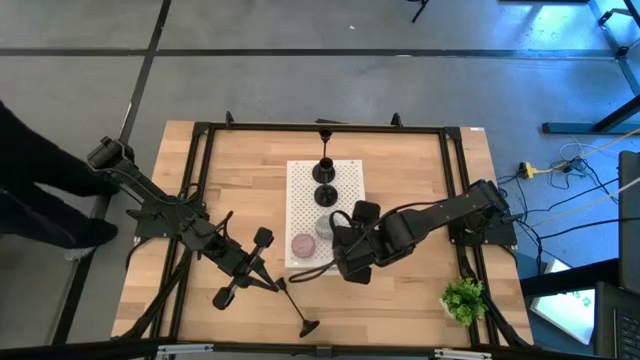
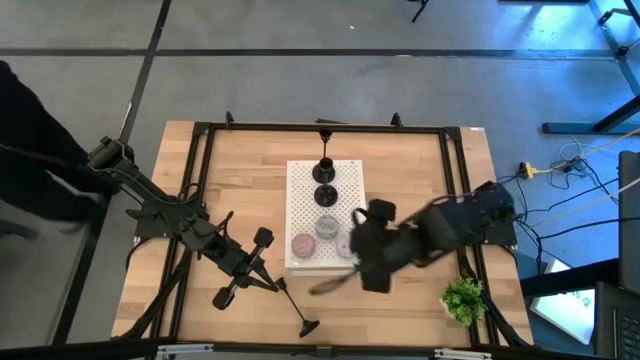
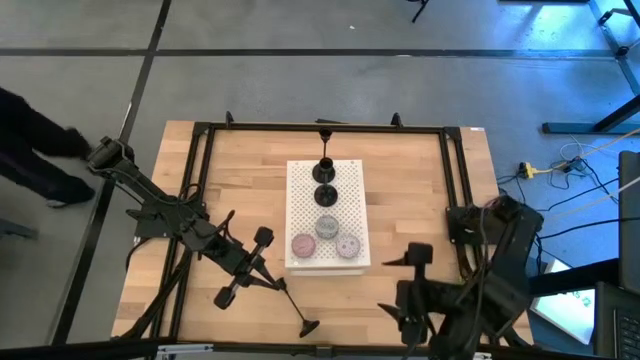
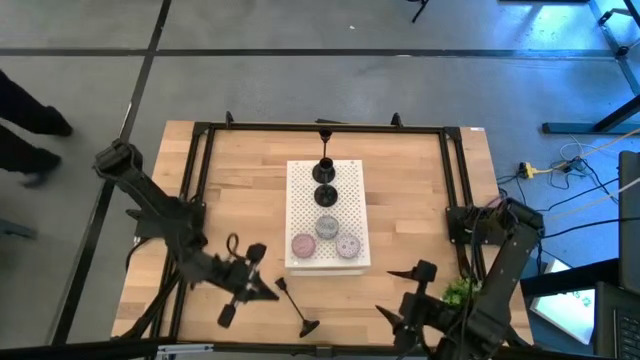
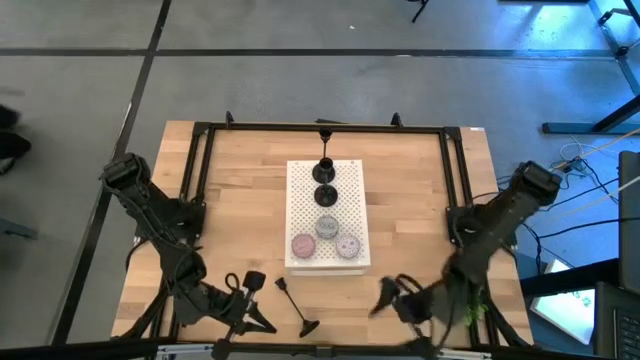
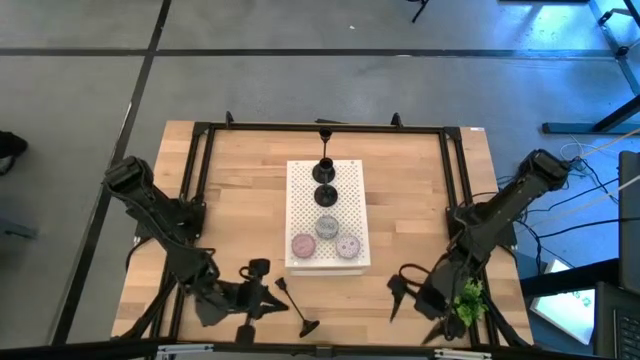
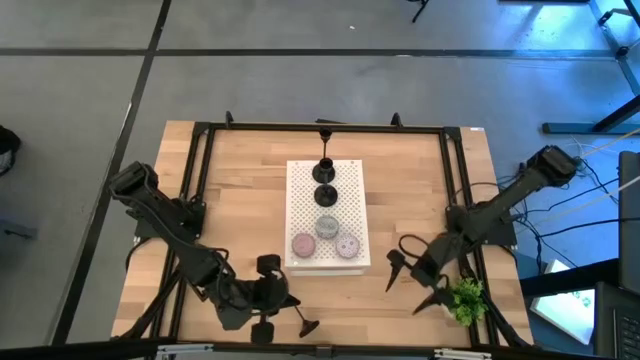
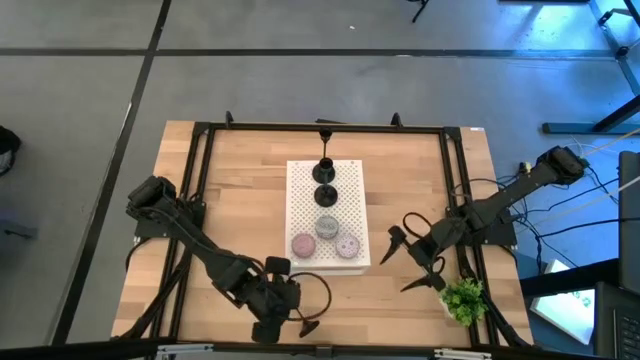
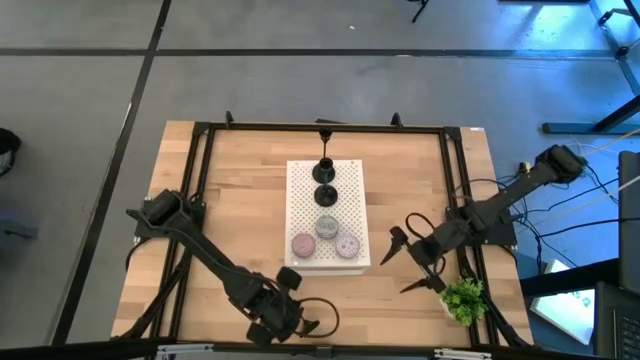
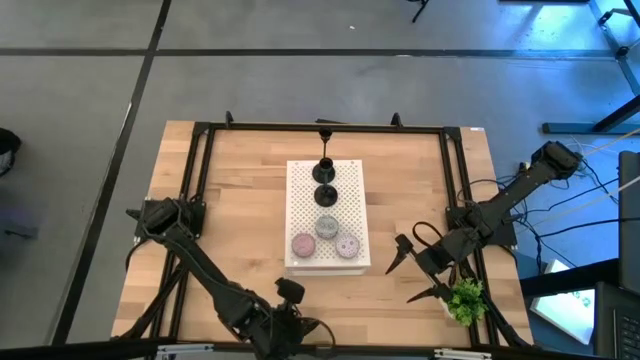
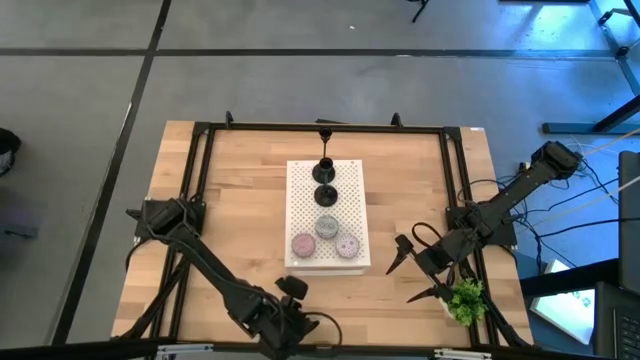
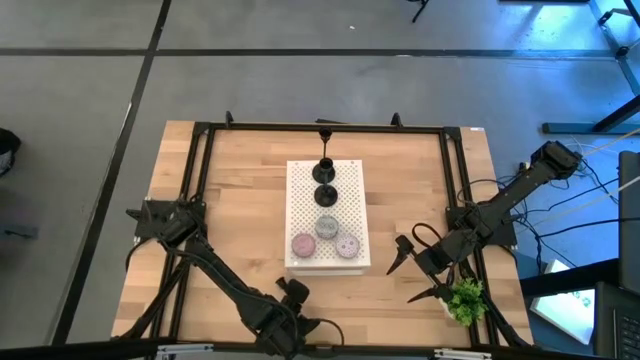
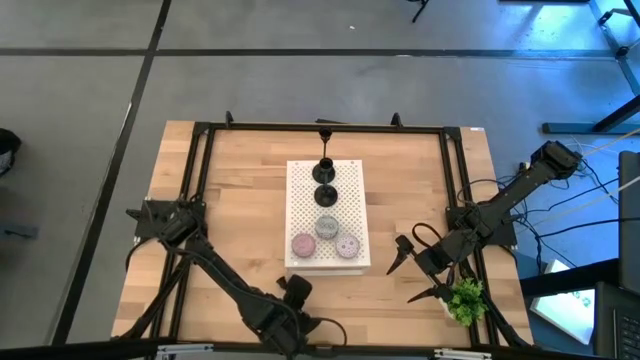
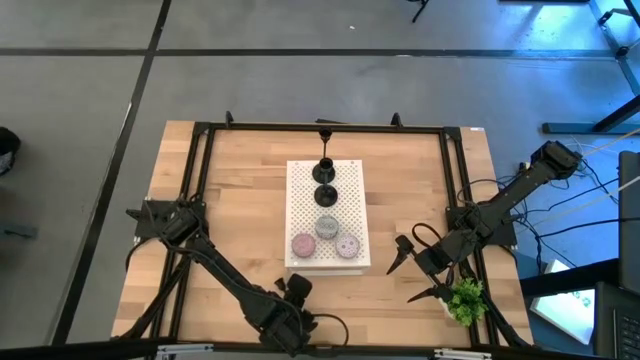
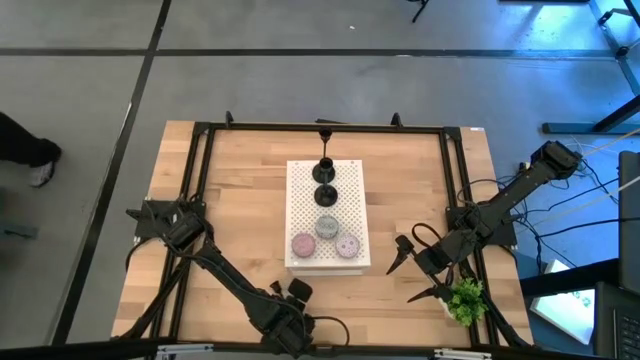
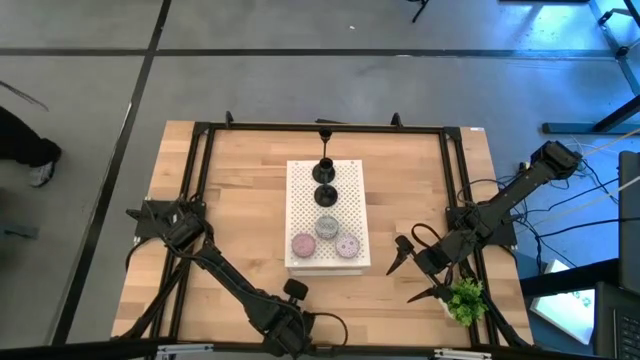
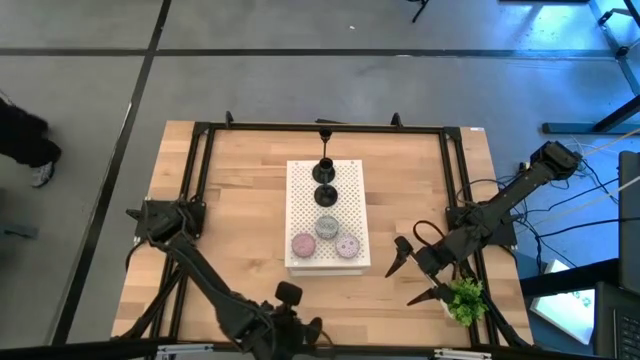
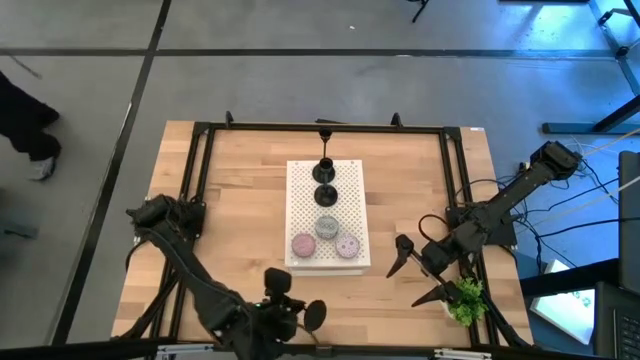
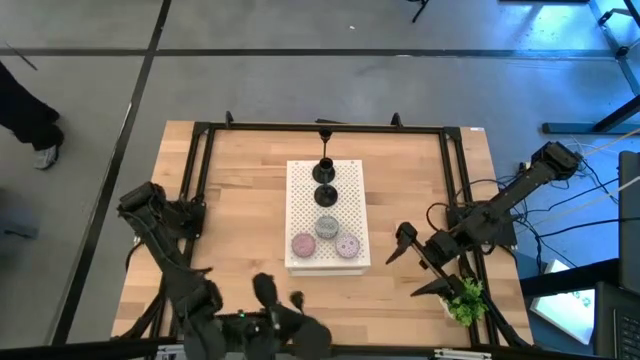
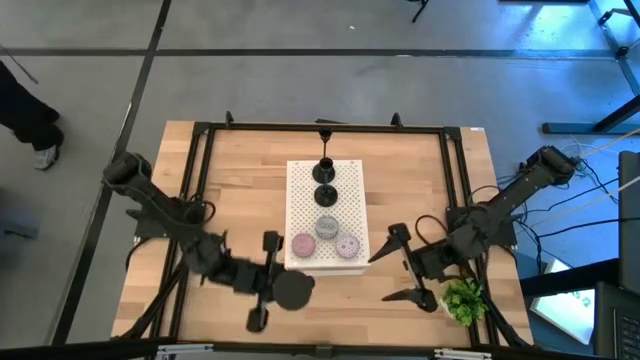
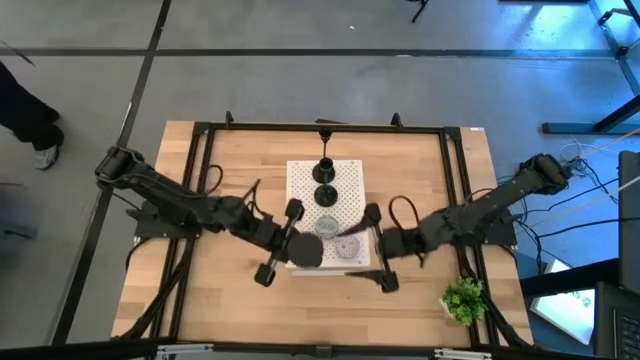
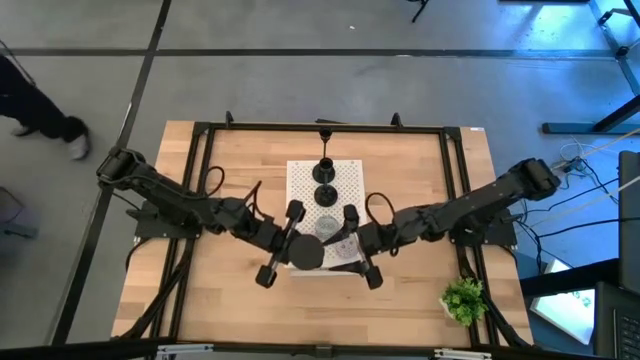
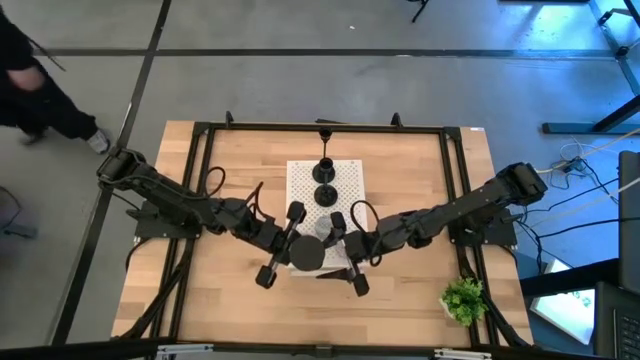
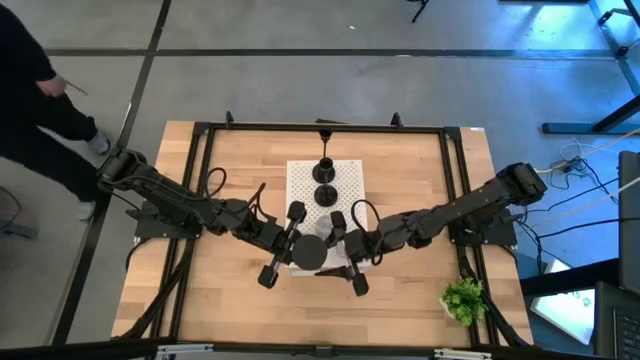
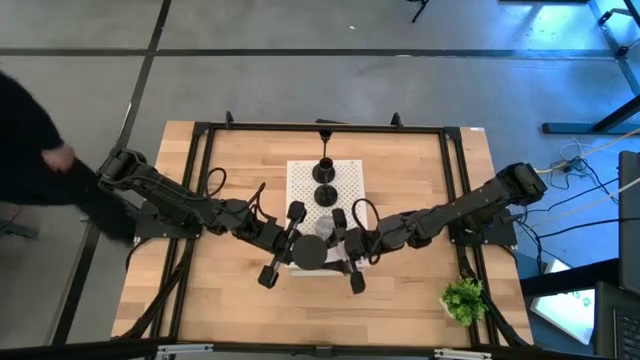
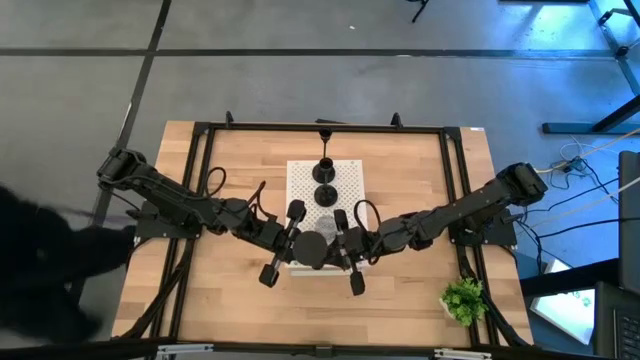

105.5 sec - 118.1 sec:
Task: Pick & Place candle stick holders
Put the black candle holder on the shelf

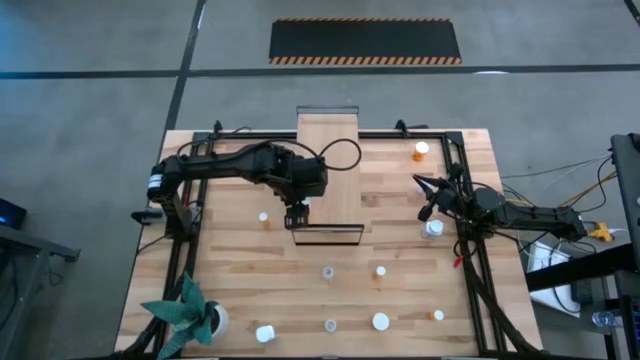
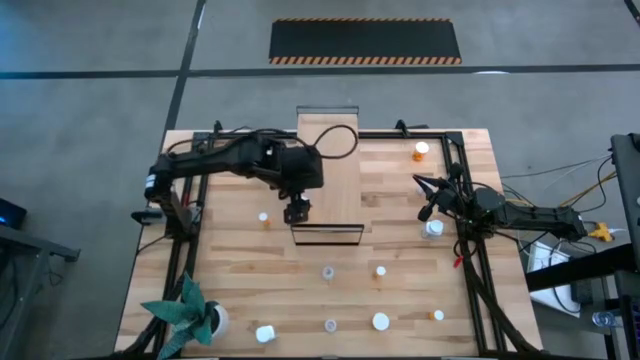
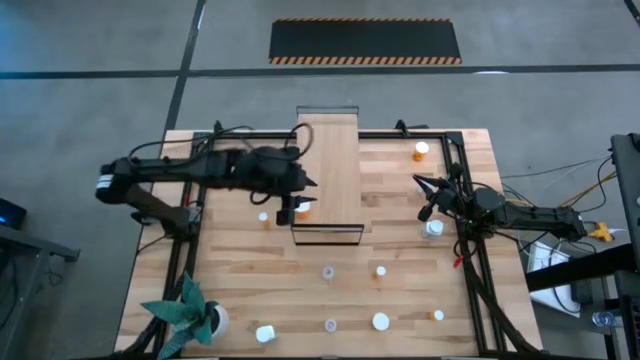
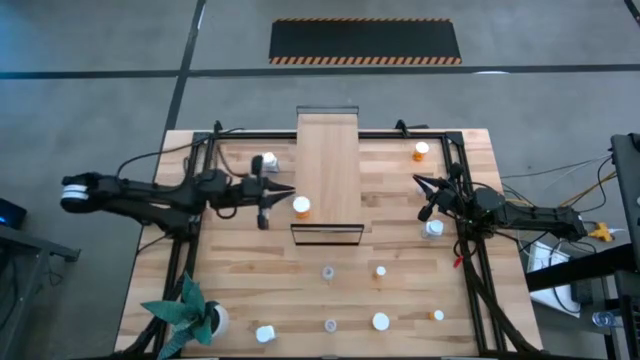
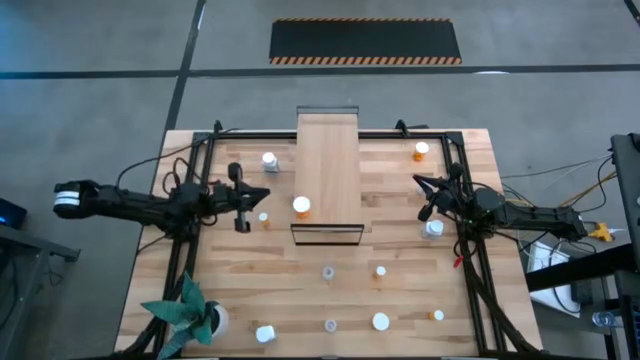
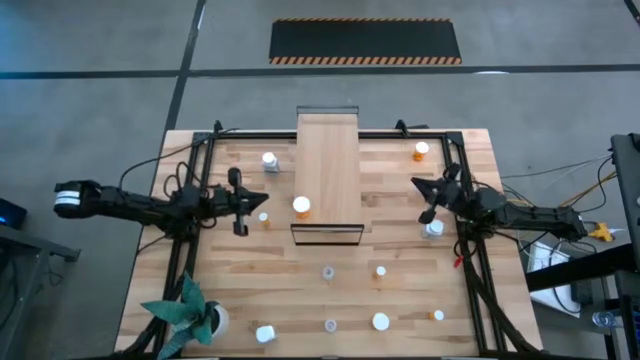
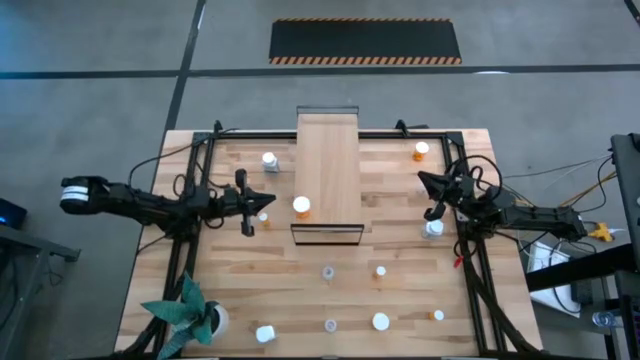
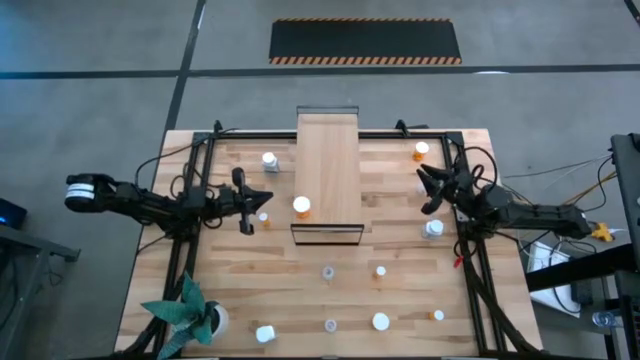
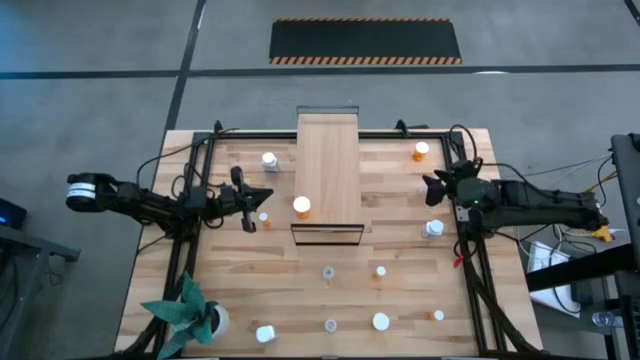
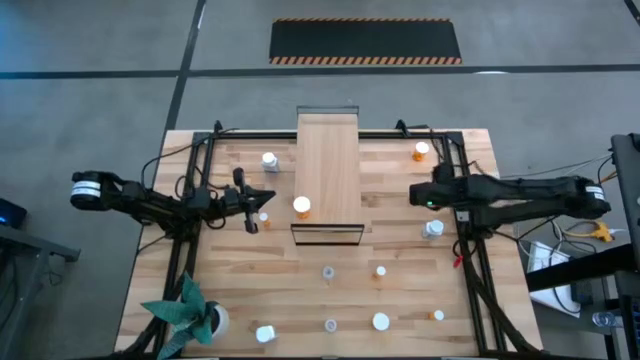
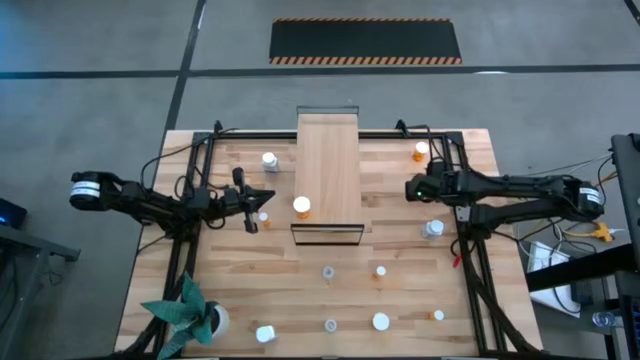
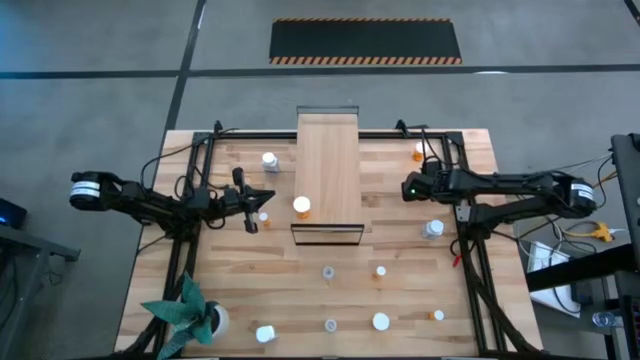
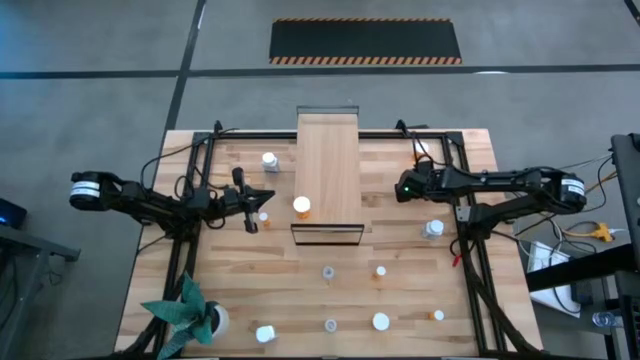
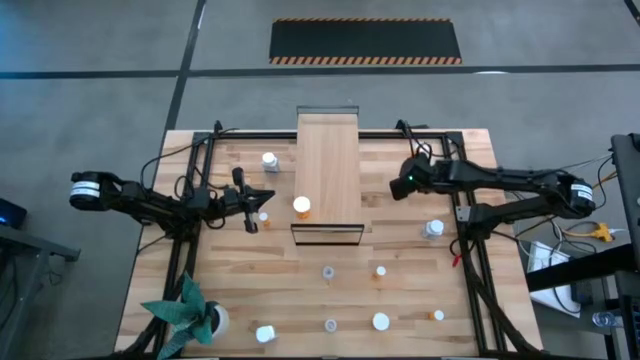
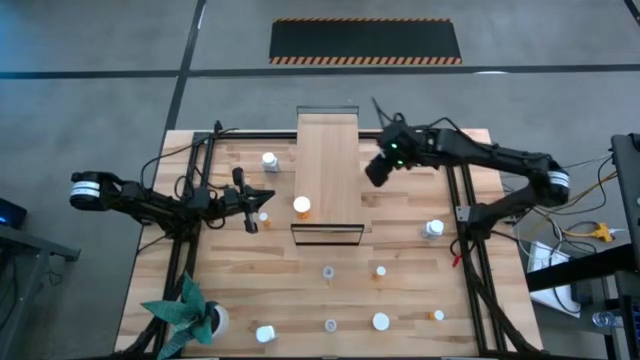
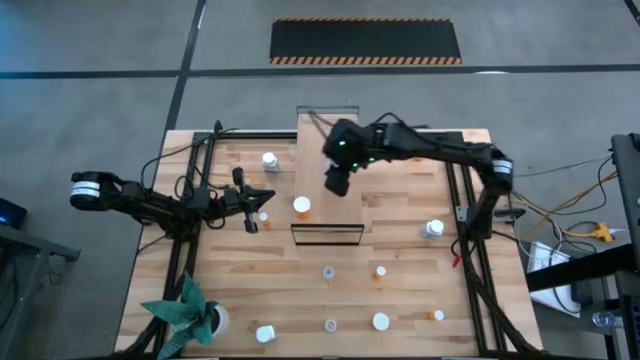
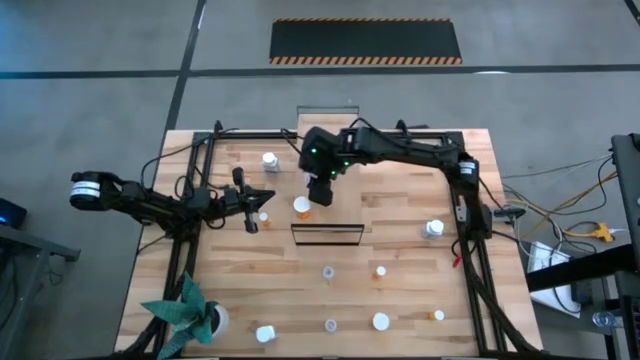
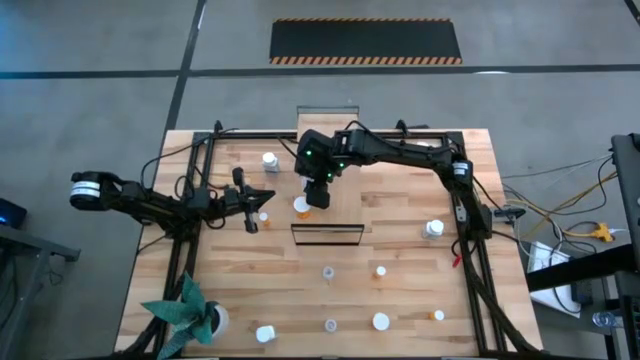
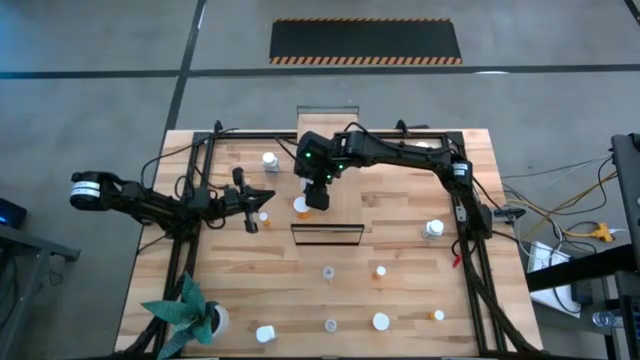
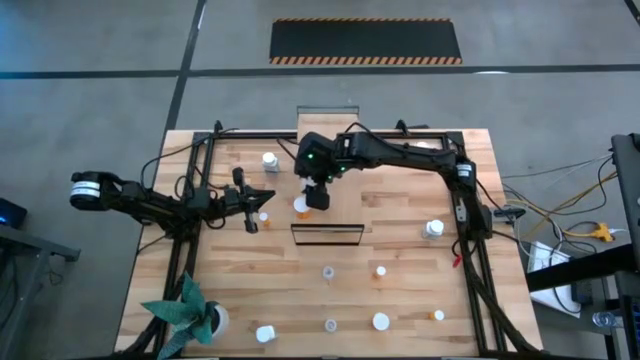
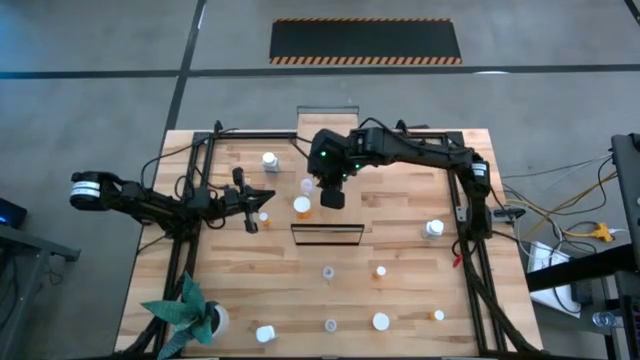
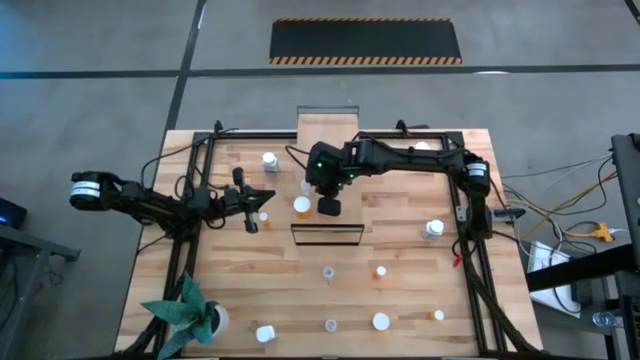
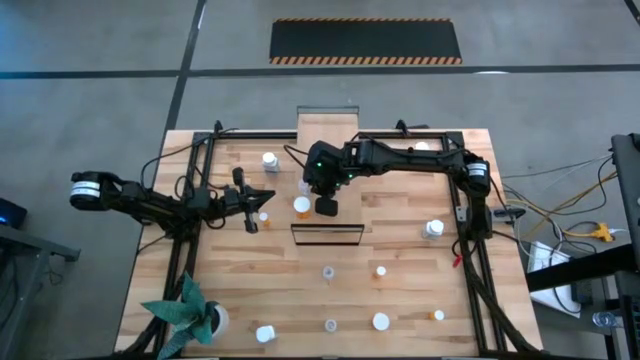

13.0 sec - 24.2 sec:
Task: Pick and place medicine bottles onto shelf by color
Put the top transparent pill bottle on the shelf
